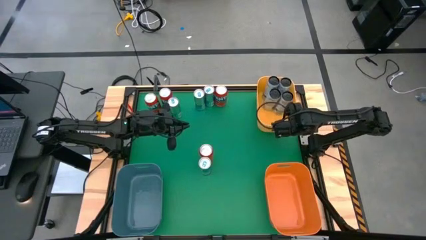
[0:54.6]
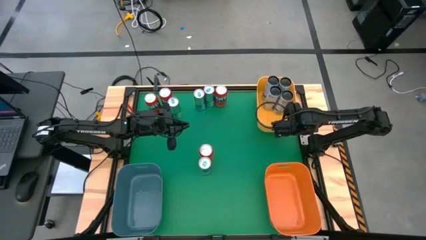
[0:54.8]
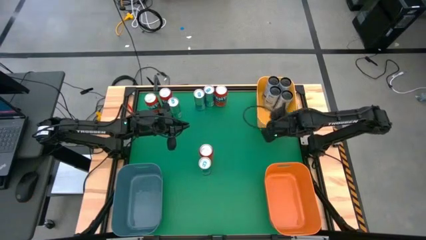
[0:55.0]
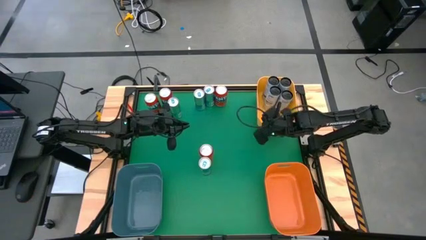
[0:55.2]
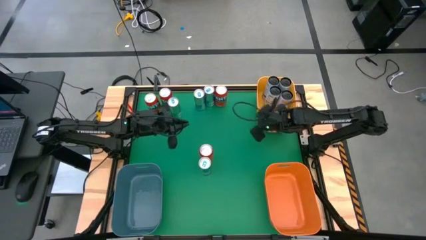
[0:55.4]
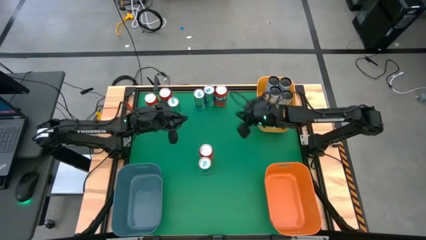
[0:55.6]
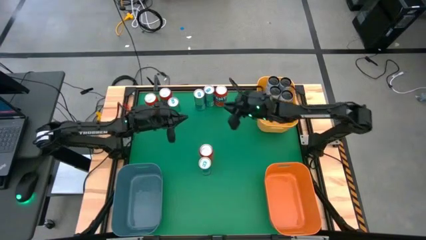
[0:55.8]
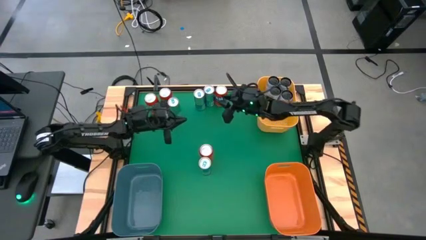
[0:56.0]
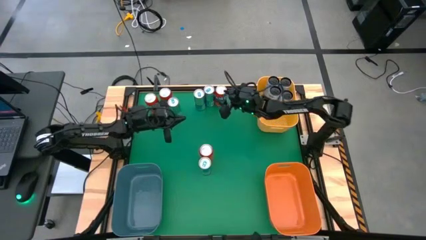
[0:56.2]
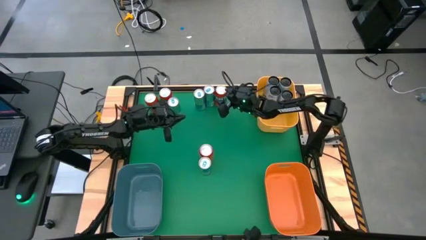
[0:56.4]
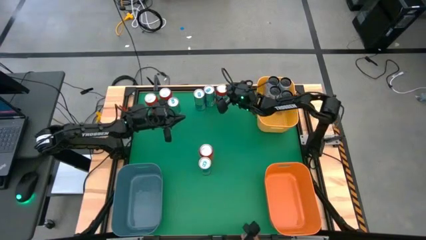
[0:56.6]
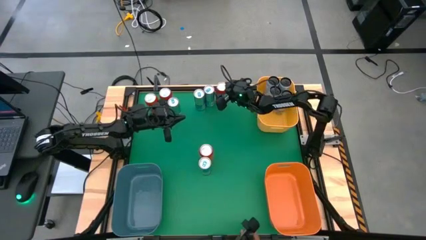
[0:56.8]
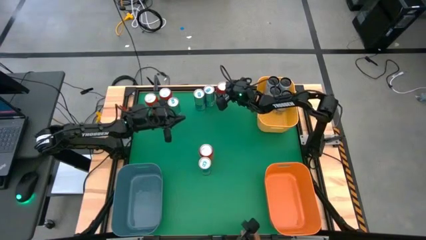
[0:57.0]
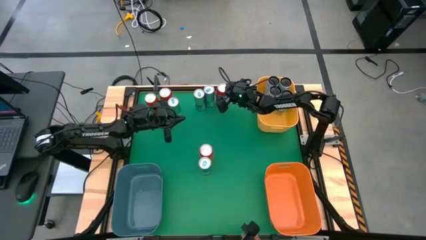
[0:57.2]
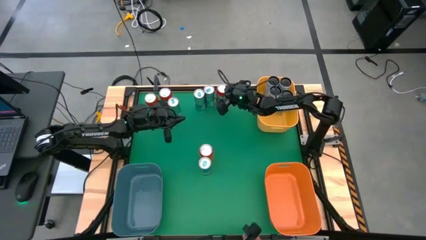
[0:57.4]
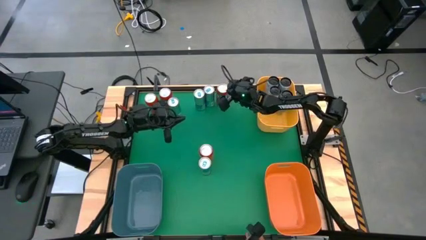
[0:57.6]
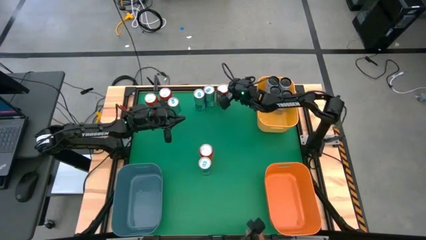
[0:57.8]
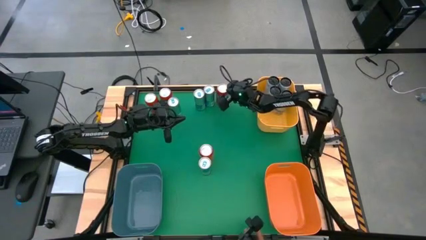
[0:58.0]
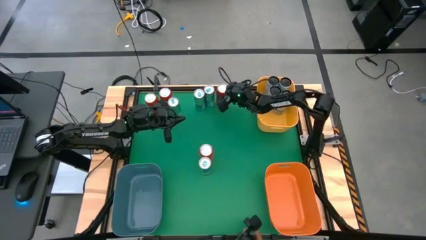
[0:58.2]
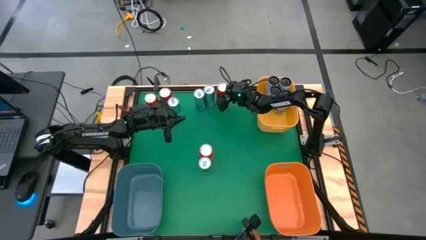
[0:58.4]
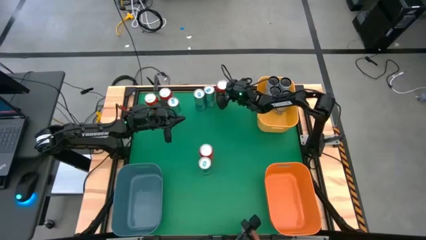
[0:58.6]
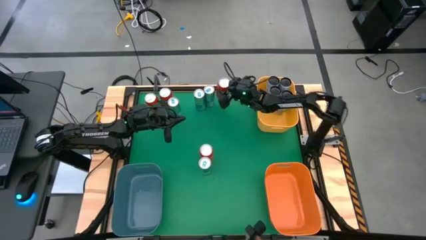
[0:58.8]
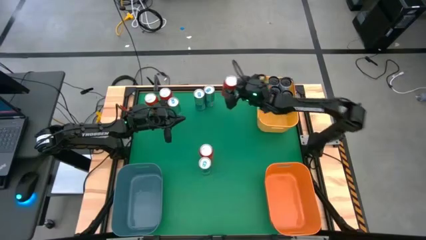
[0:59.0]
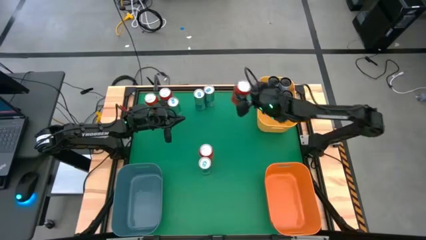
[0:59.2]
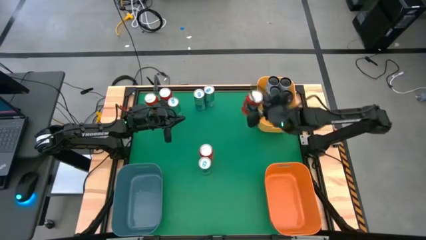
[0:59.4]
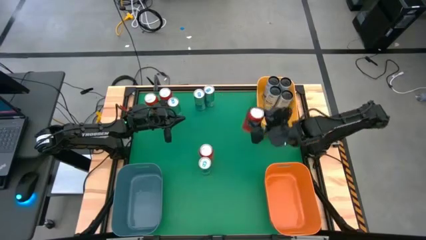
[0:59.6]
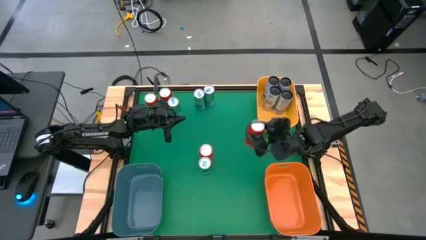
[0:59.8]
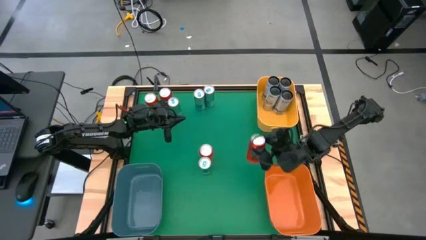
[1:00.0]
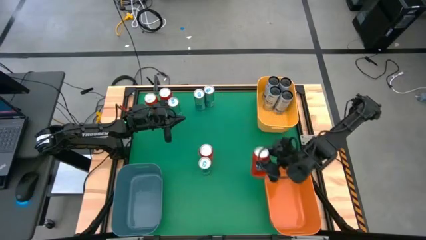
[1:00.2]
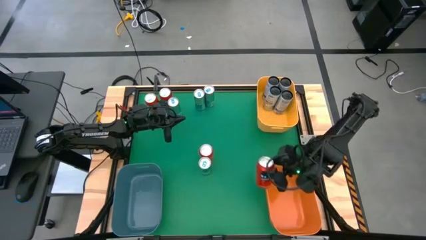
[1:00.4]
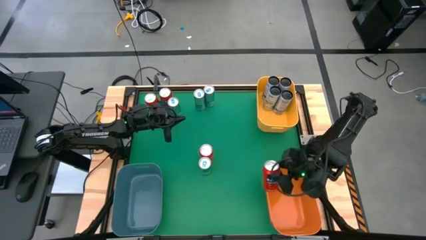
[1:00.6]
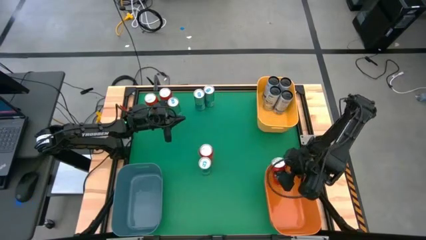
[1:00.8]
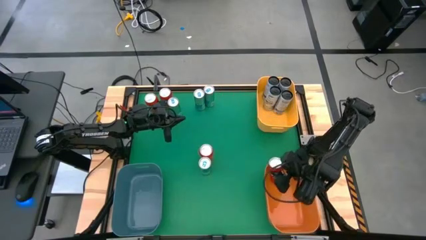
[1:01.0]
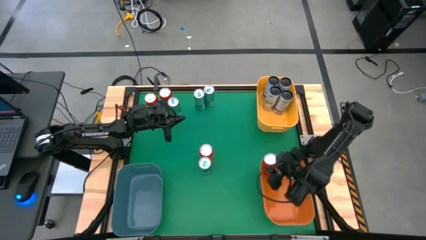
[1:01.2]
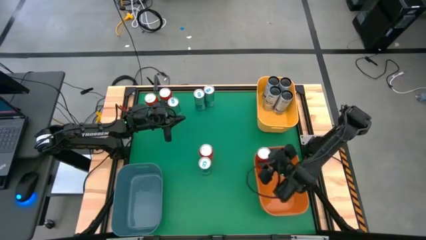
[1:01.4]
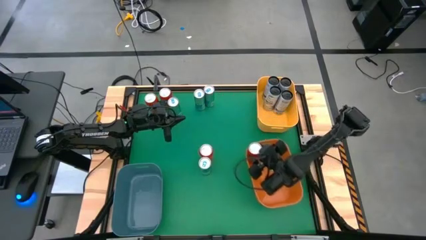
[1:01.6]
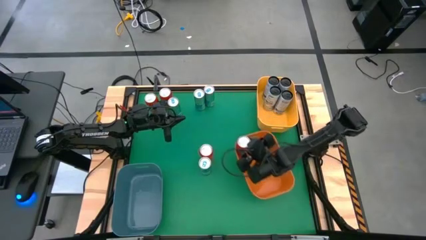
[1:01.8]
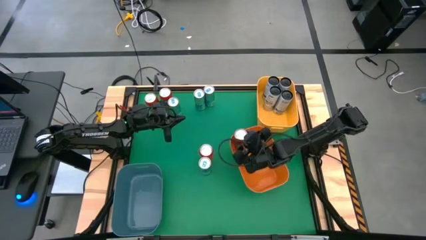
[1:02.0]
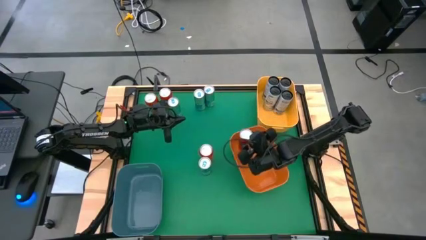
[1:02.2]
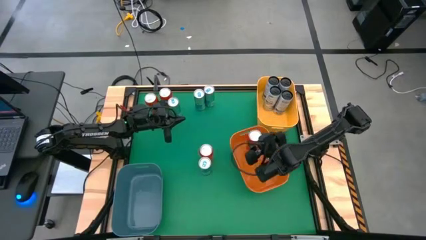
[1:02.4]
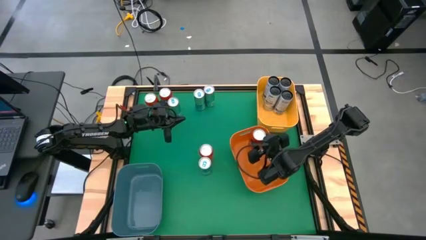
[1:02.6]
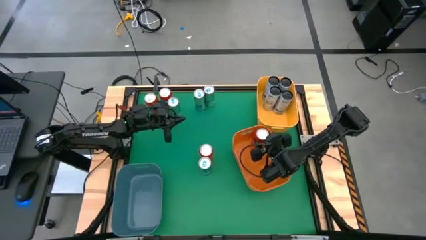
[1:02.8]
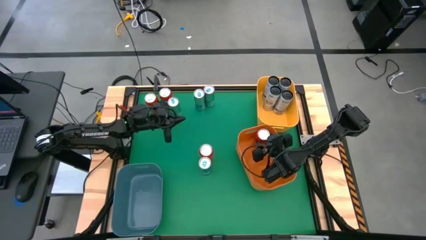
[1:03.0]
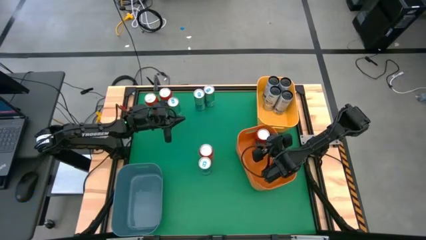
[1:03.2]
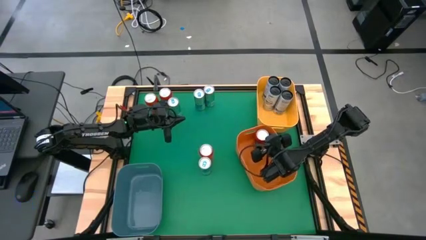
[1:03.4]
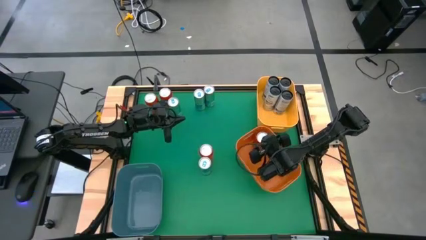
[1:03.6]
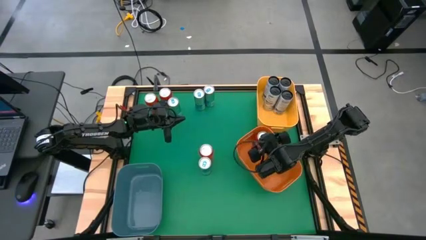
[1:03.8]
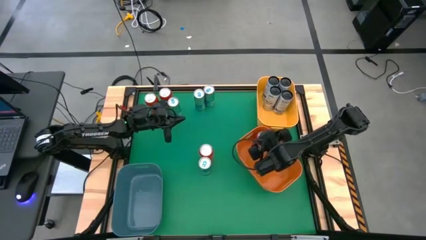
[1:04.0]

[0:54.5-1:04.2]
Task: Sort soda cans
Put the orange soda can into the orange bin

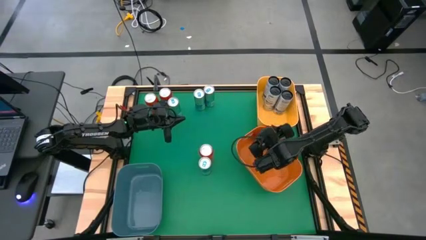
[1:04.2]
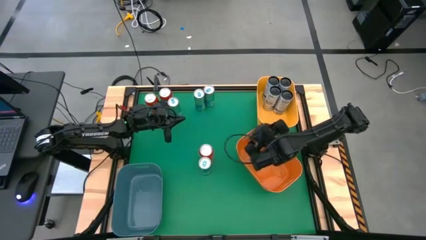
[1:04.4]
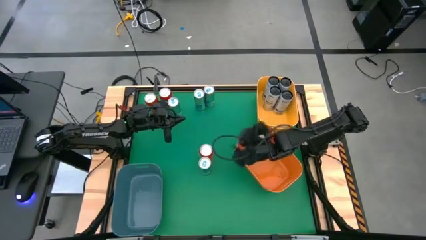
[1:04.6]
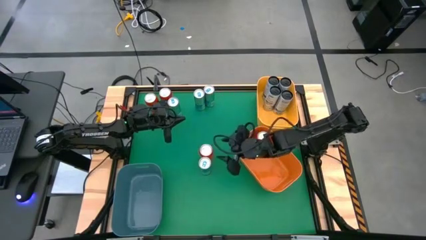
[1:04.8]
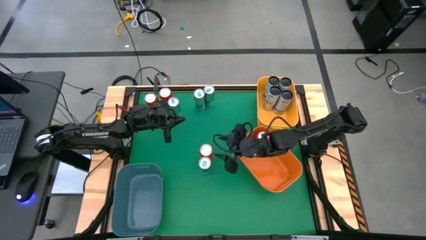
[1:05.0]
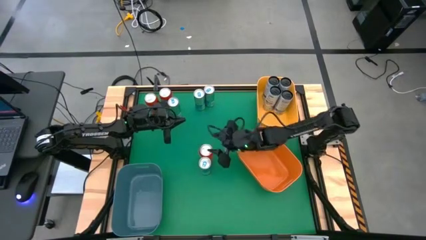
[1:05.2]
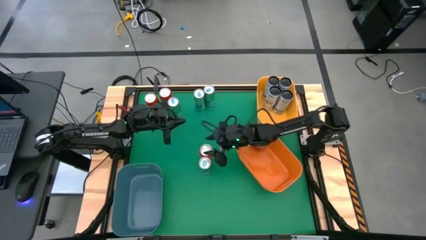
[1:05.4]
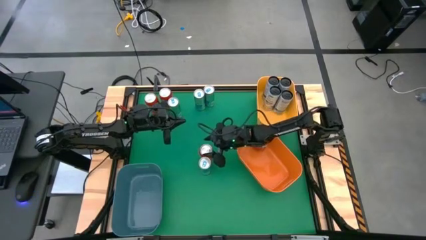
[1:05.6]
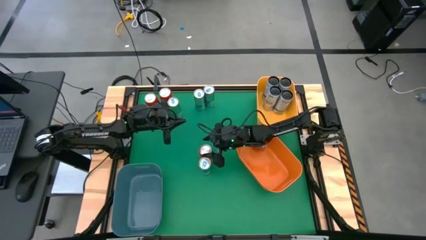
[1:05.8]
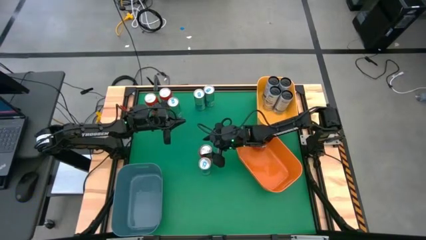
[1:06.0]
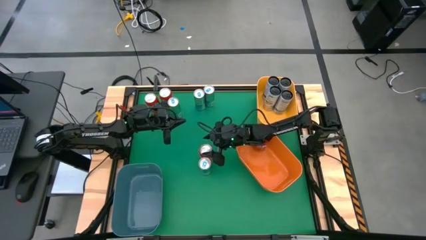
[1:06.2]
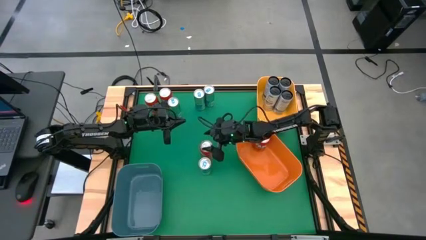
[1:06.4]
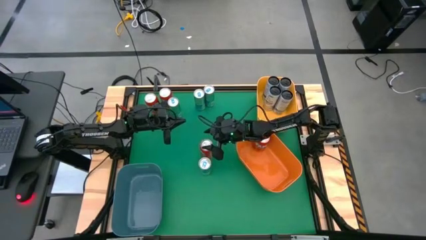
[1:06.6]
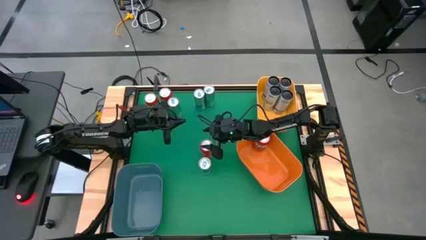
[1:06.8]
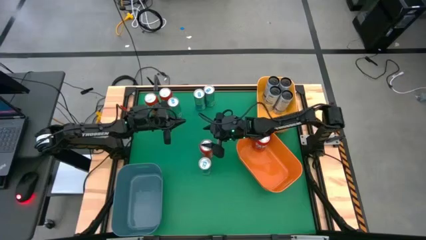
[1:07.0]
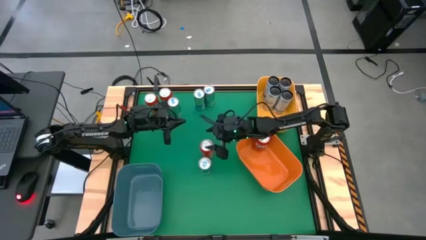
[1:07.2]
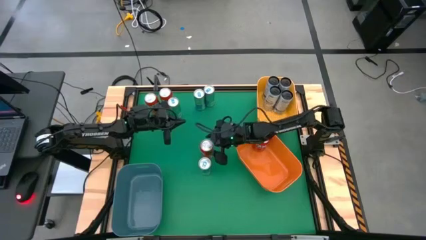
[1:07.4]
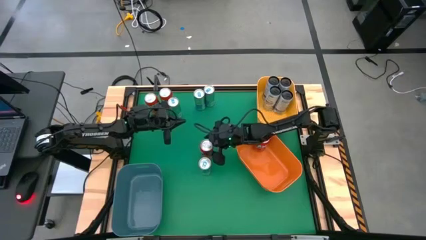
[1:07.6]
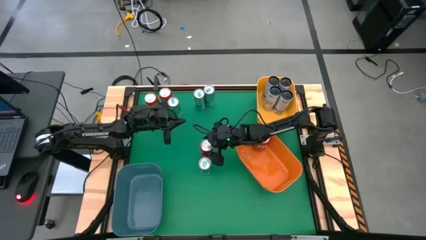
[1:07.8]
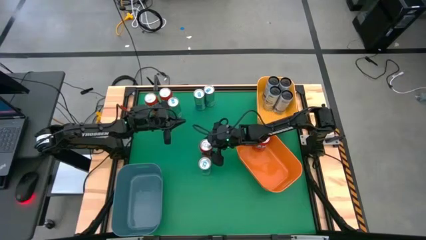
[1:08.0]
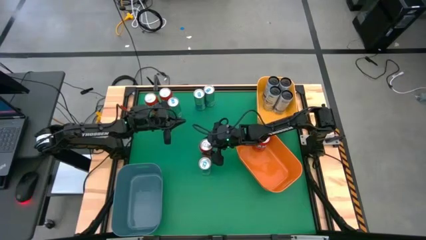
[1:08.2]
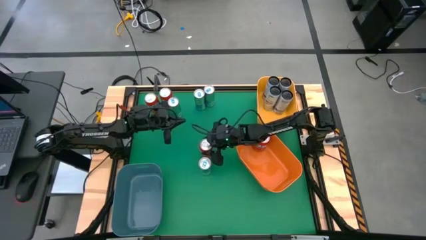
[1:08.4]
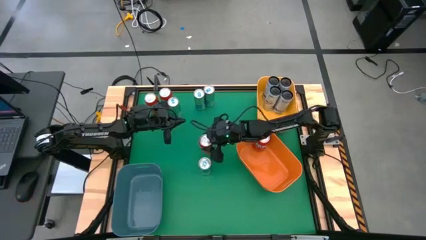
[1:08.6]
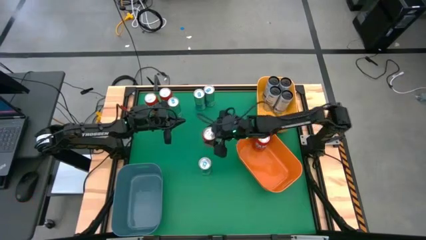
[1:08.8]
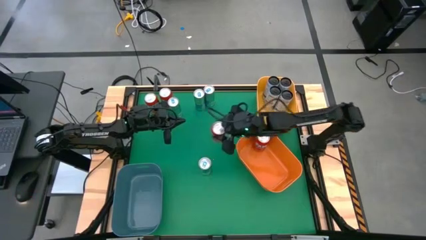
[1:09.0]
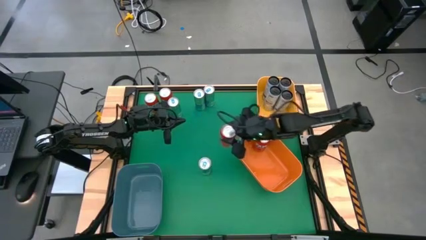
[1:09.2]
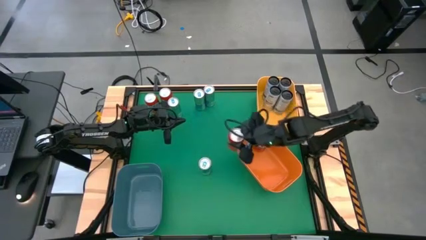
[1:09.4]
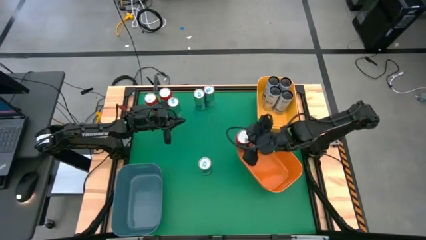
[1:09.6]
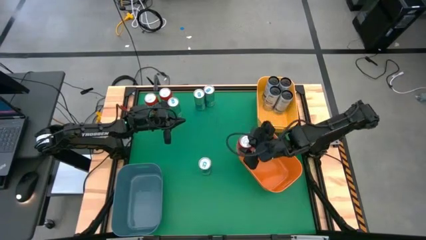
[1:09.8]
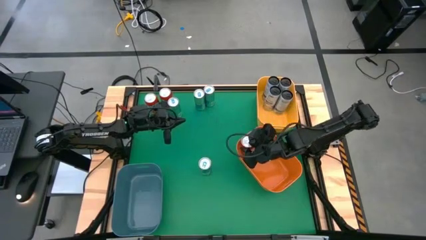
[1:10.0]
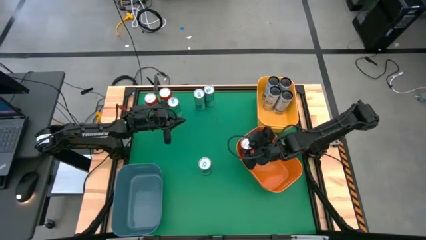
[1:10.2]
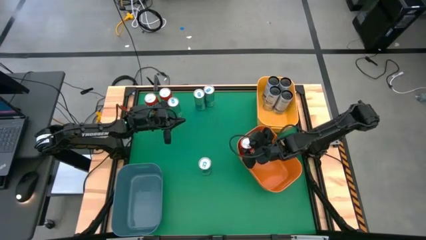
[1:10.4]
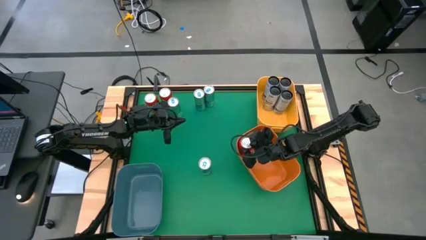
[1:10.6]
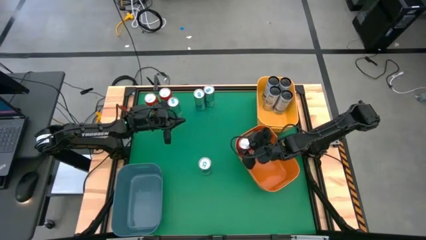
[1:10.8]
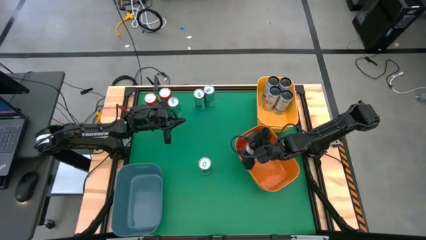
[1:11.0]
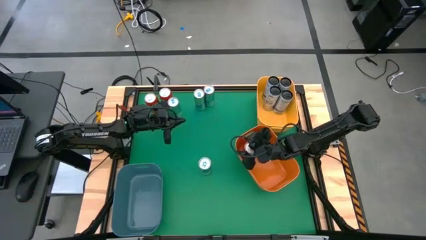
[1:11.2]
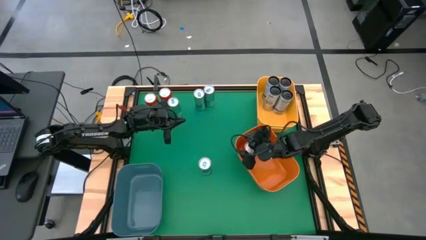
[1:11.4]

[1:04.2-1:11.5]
Put the orange soda can into the orange bin
